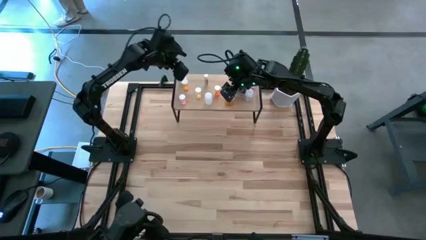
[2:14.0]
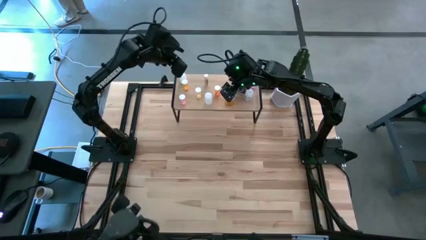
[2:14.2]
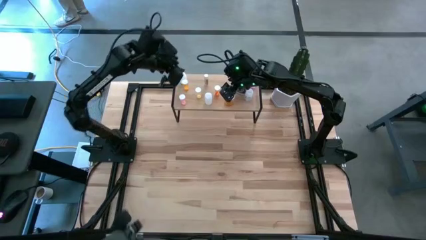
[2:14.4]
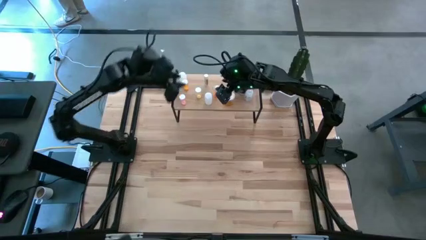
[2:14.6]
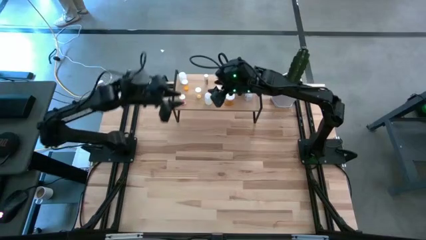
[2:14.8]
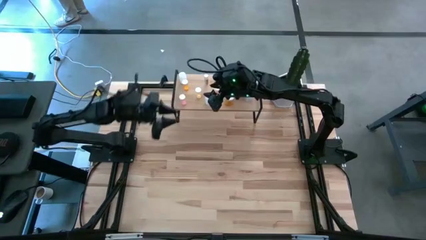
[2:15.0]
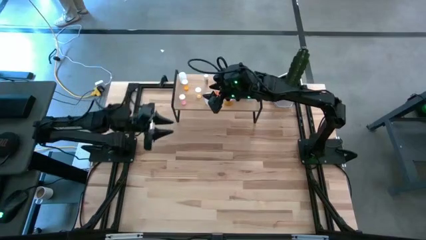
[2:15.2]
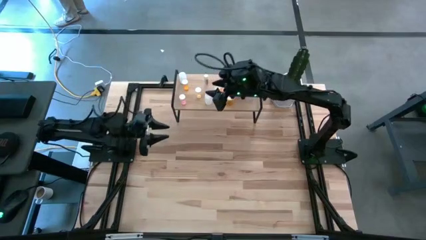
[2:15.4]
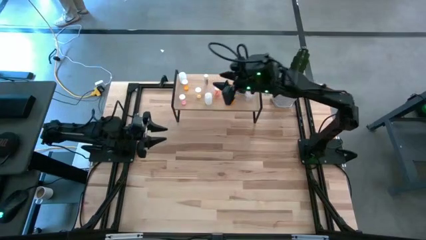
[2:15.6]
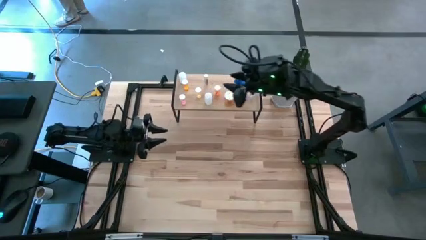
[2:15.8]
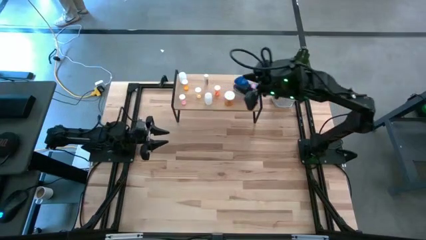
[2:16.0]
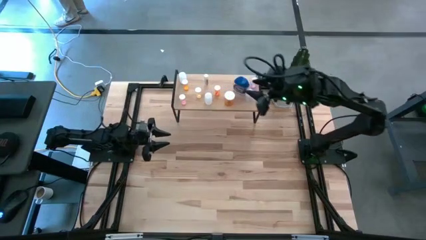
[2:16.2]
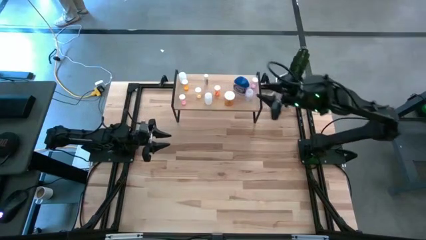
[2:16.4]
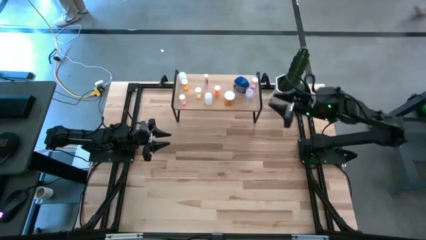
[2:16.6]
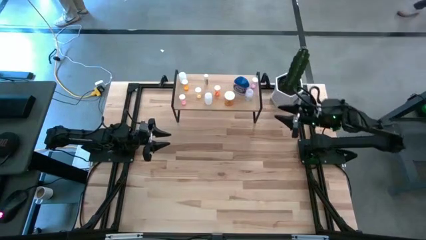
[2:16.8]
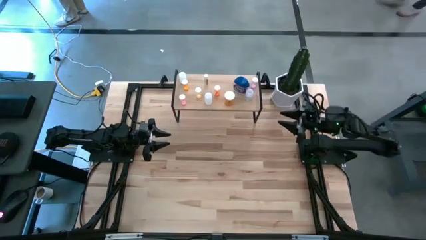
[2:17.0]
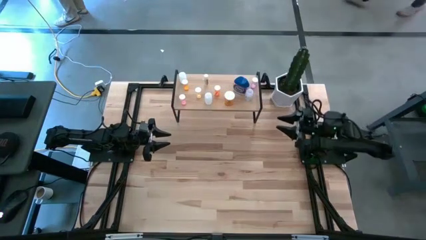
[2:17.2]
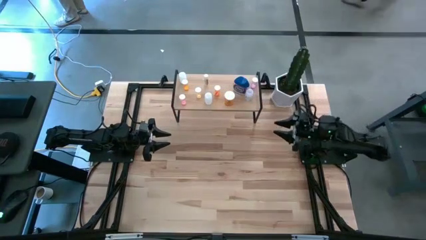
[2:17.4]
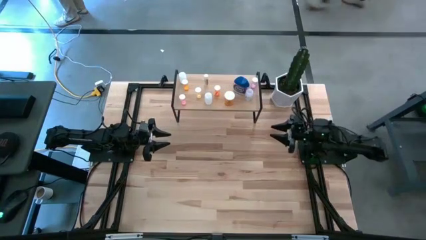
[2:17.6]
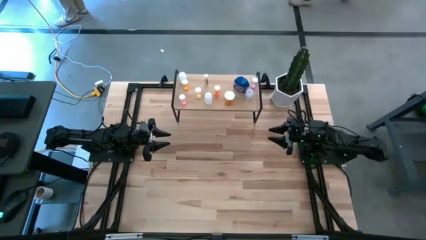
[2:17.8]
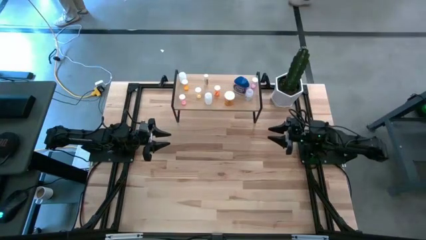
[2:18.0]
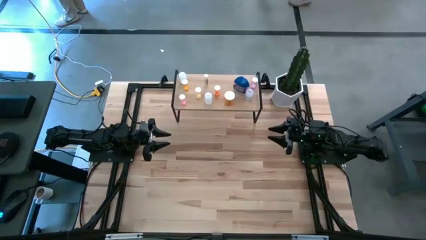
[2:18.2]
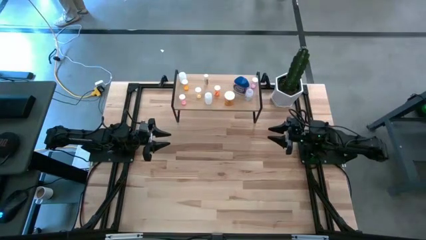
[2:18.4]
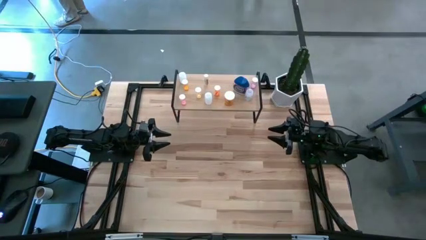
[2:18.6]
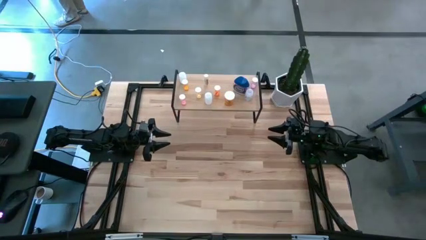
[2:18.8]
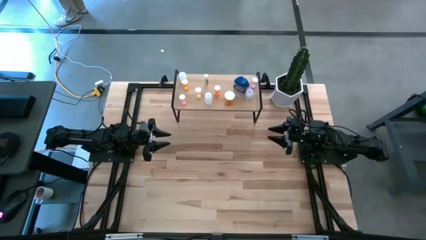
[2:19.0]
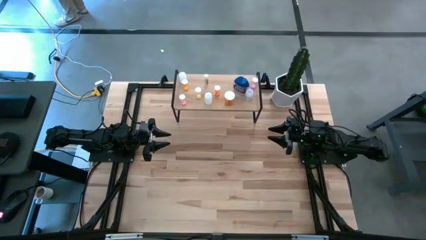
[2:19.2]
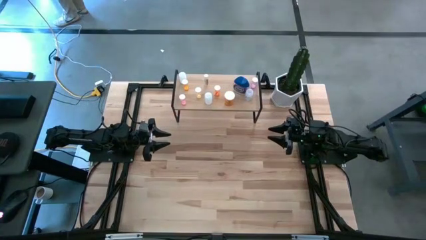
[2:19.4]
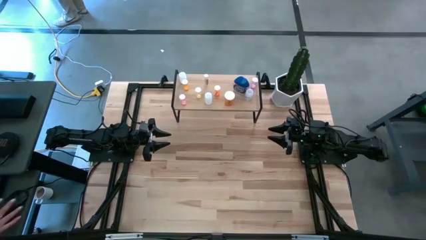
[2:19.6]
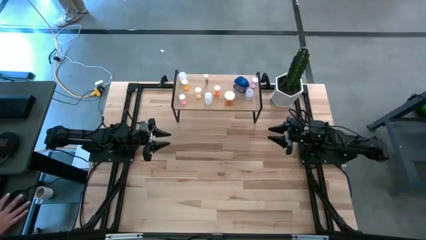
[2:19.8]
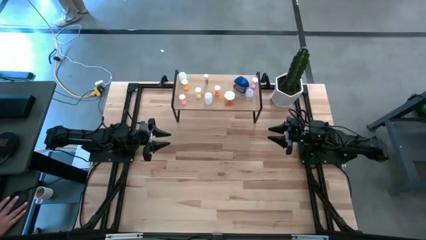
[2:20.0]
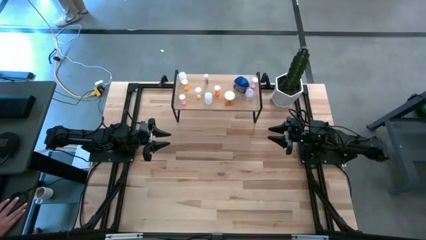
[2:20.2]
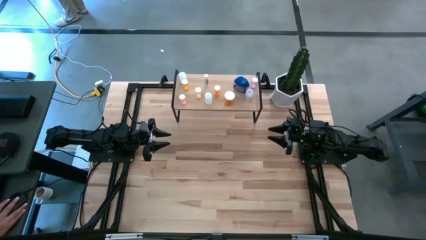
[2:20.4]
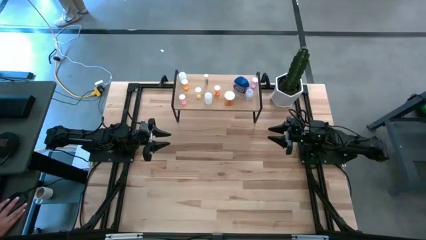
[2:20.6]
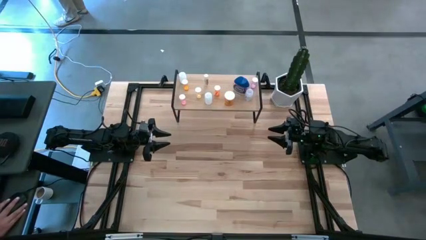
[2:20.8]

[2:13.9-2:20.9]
Task: Pick and place medicine bottles onto shelf by color
Return to Home Position

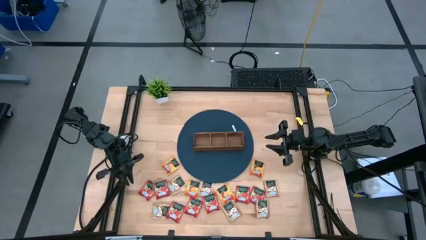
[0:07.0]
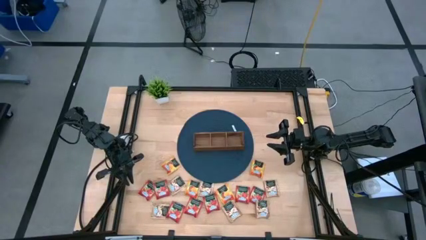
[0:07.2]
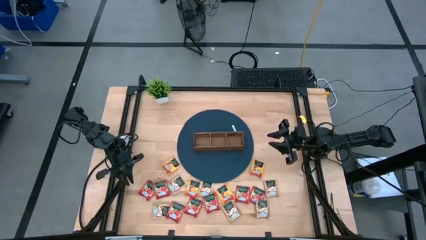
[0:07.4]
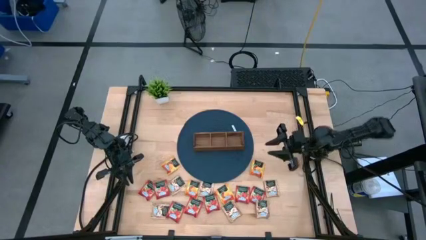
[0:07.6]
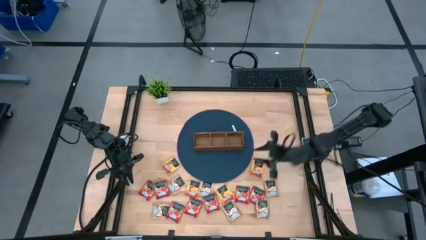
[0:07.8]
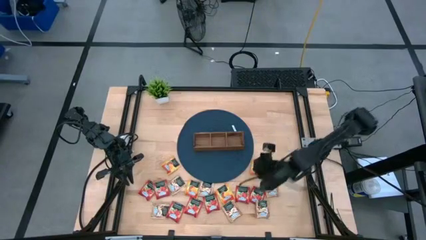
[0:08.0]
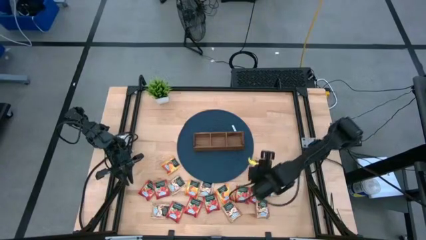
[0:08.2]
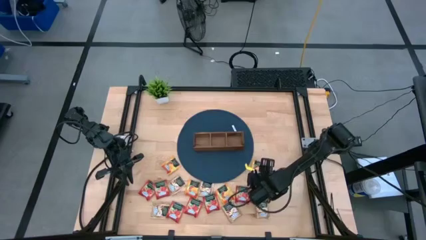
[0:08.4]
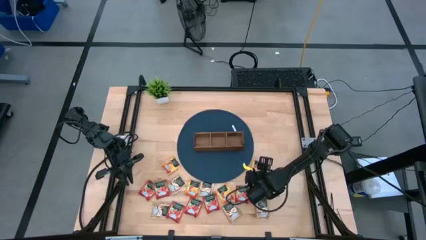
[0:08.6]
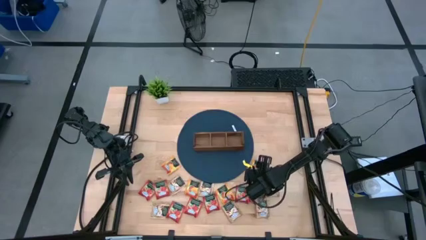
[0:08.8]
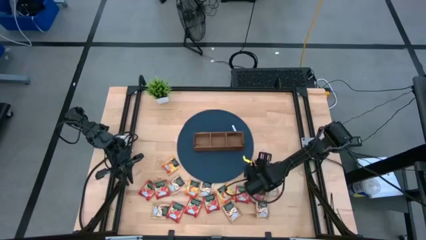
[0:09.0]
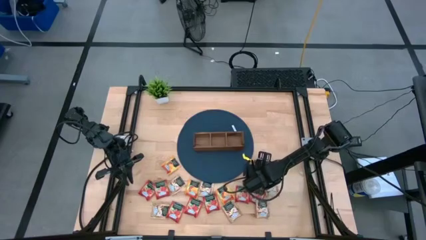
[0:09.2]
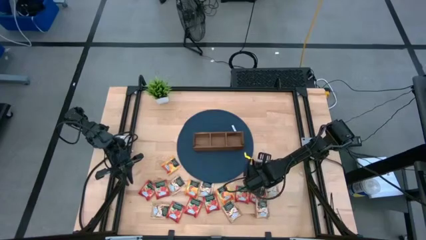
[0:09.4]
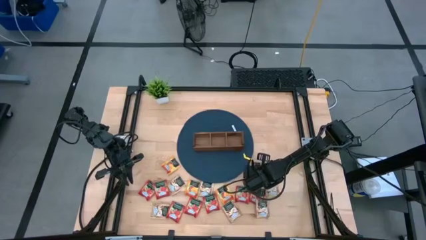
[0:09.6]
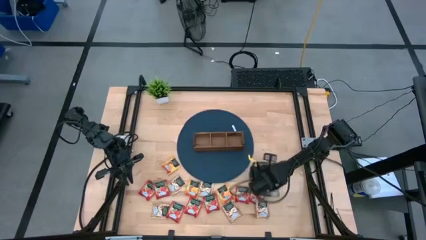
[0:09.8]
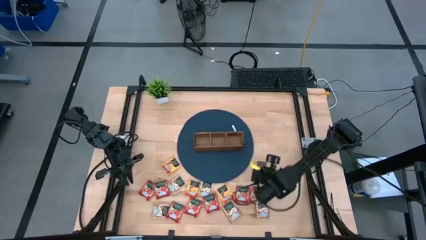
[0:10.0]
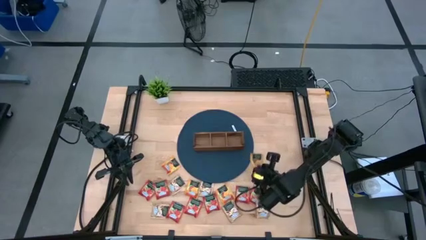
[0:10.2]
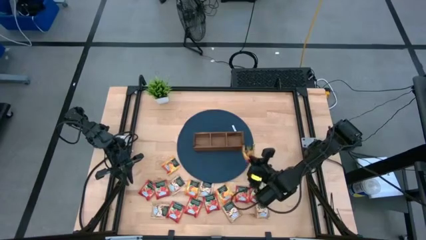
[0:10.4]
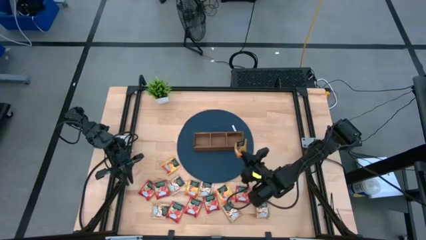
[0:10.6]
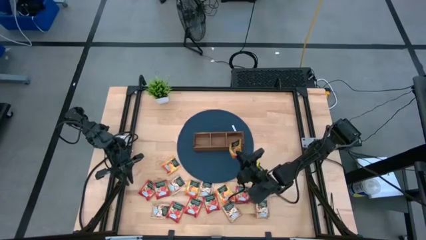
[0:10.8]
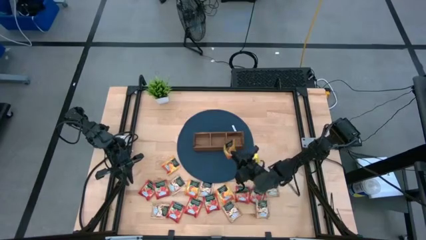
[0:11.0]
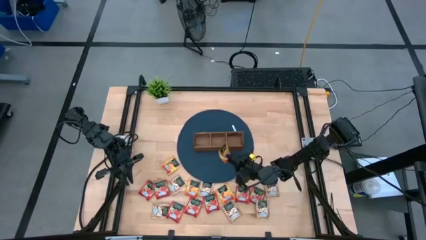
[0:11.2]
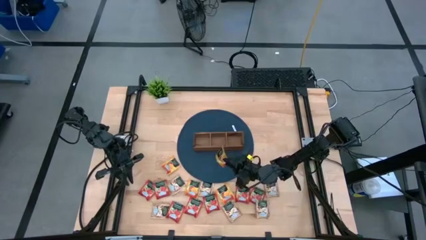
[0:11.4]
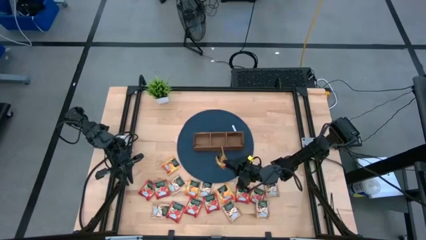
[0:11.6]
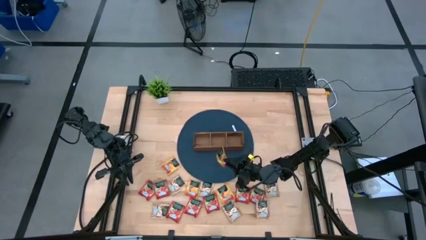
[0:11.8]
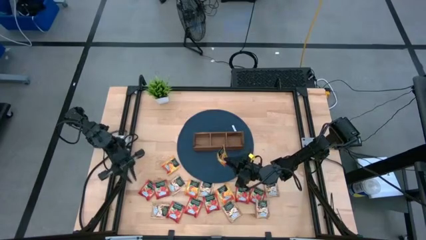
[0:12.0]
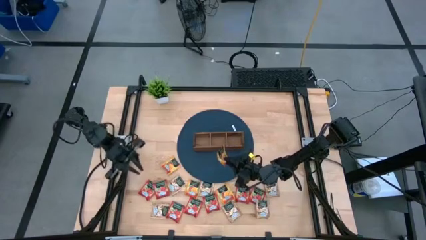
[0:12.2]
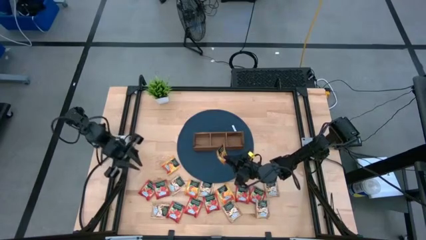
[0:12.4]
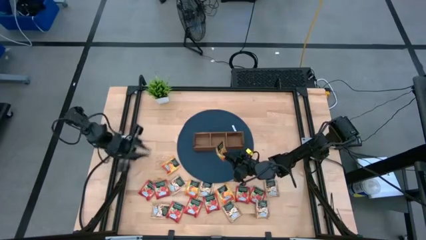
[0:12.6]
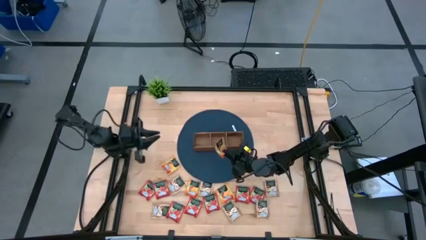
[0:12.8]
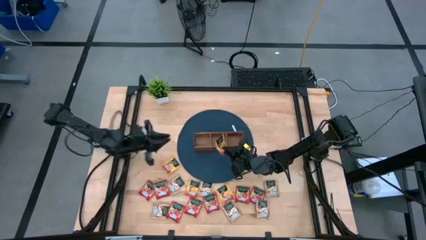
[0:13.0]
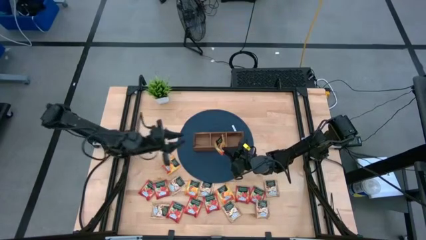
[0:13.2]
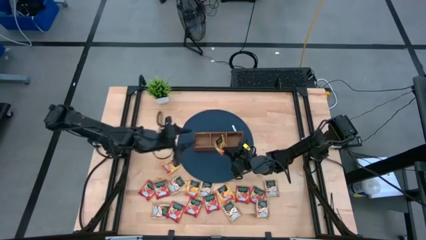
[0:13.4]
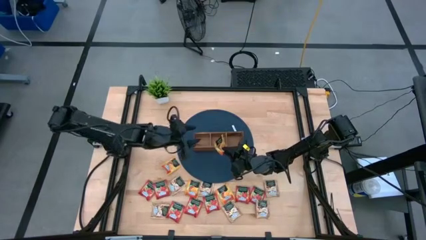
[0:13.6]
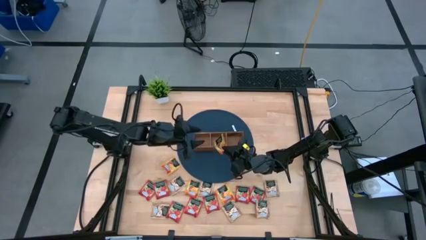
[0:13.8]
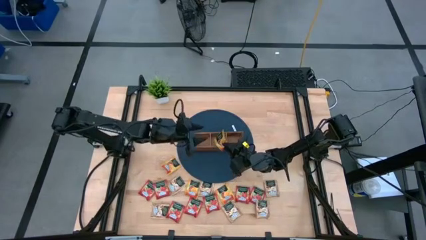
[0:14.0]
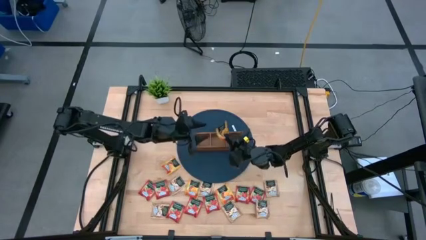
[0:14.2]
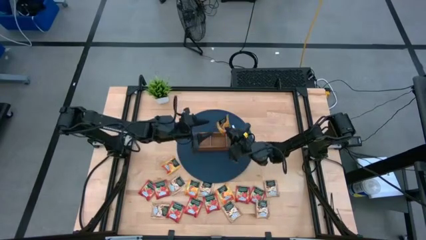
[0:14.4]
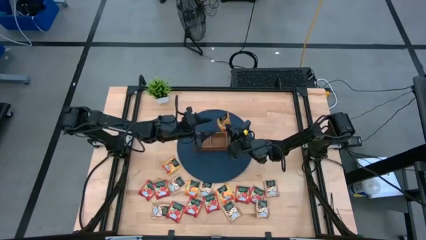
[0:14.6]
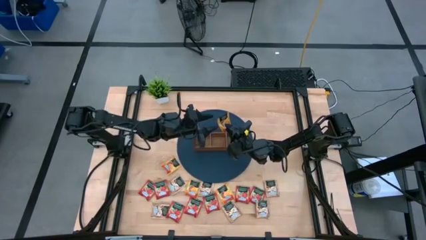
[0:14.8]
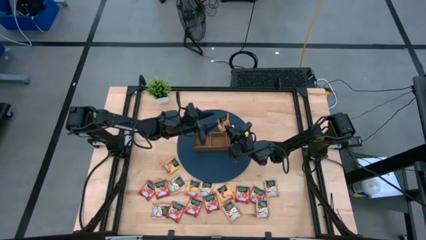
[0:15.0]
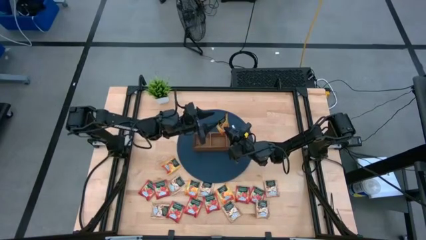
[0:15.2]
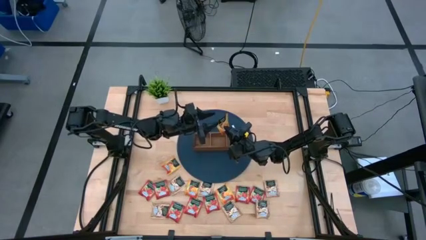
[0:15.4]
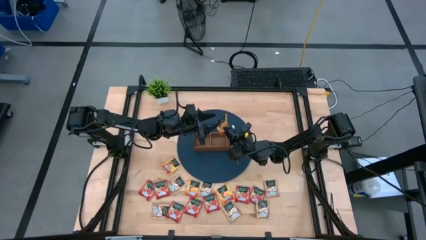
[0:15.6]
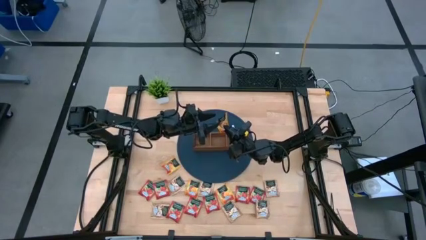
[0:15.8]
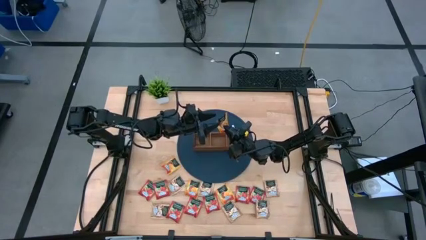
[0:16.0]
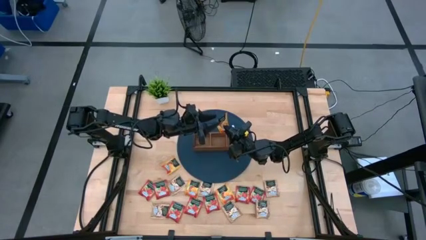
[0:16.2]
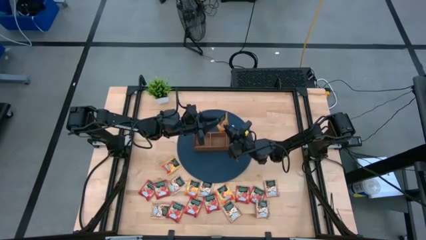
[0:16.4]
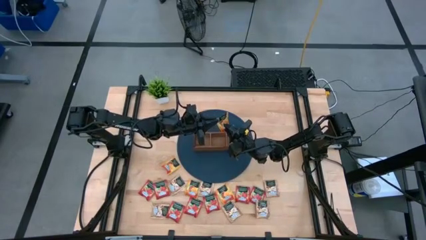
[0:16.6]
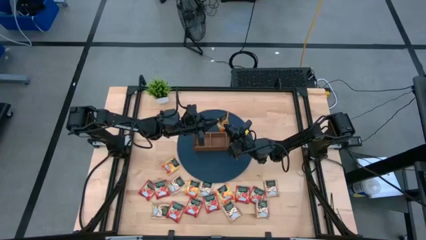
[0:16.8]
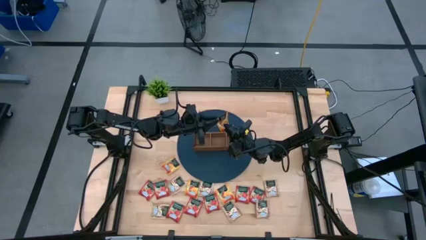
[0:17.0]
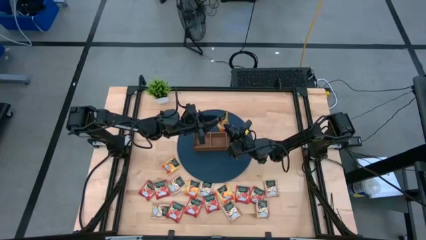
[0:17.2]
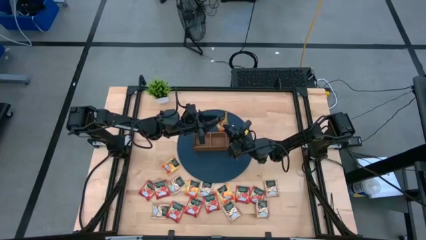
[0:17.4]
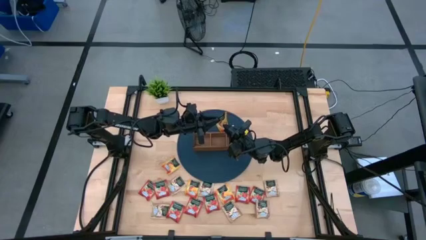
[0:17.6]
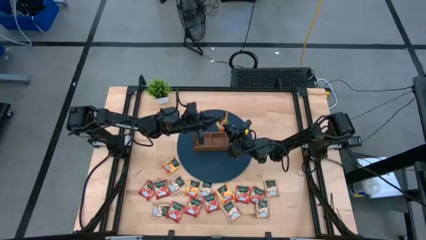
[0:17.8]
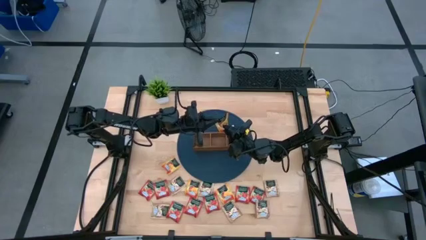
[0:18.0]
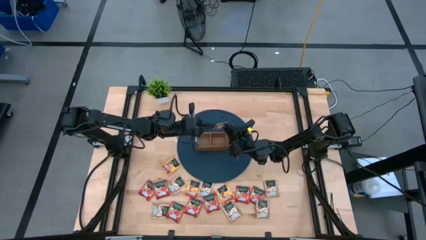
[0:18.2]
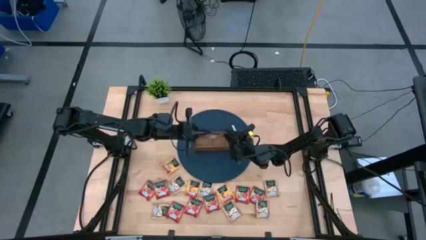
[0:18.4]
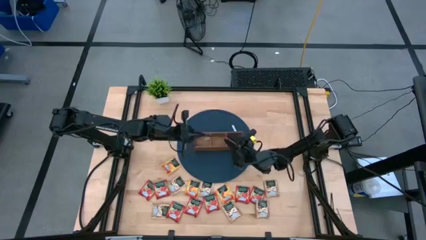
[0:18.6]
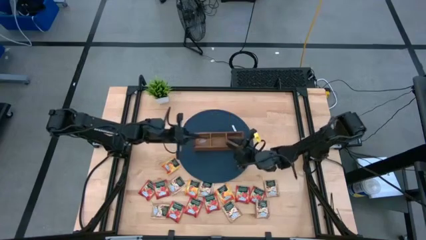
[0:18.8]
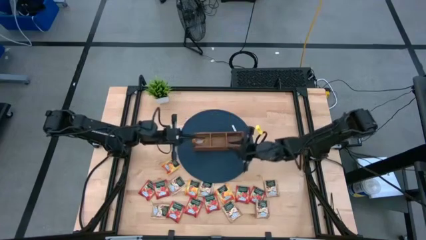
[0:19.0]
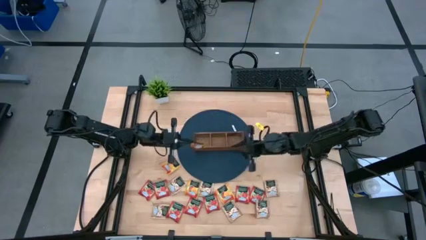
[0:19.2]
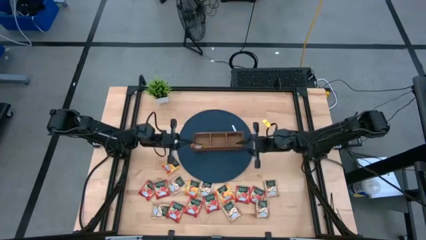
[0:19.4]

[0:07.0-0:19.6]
Task: Pick & Place Tea
Put the yellow tea bag into the left section of the wooden organizer
